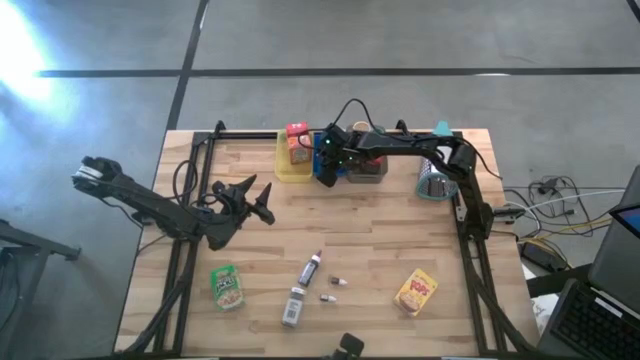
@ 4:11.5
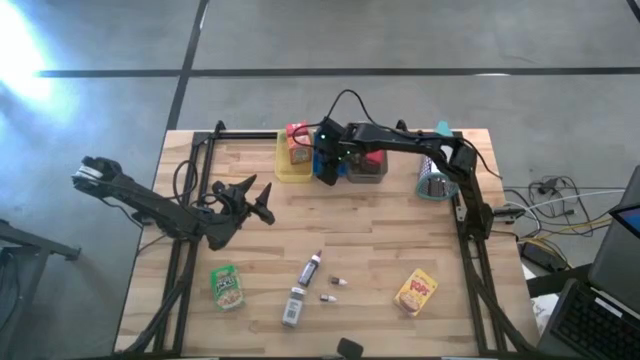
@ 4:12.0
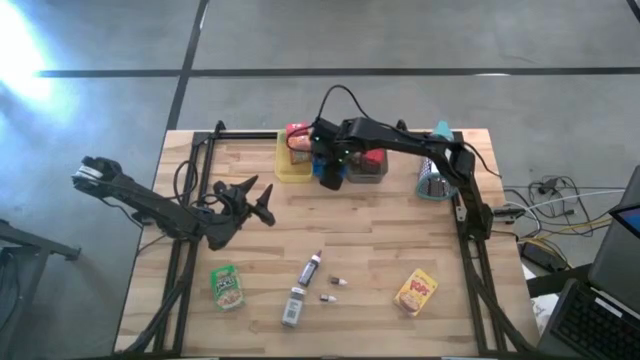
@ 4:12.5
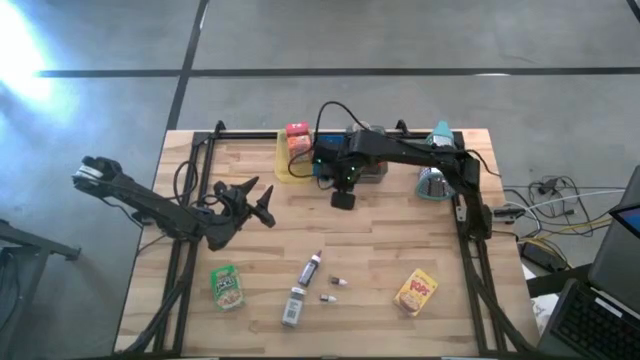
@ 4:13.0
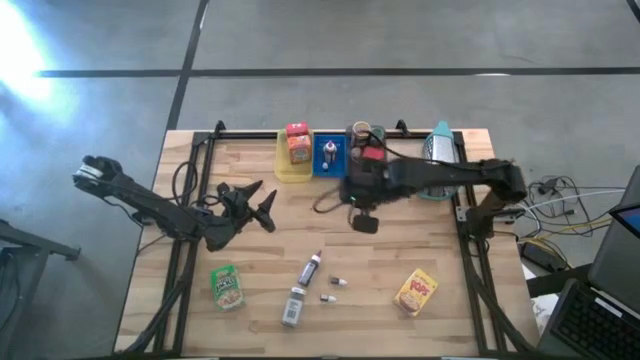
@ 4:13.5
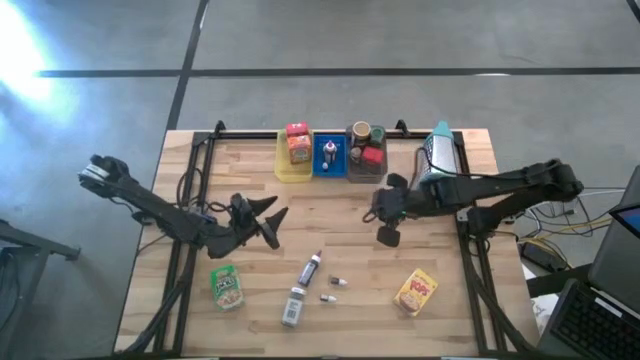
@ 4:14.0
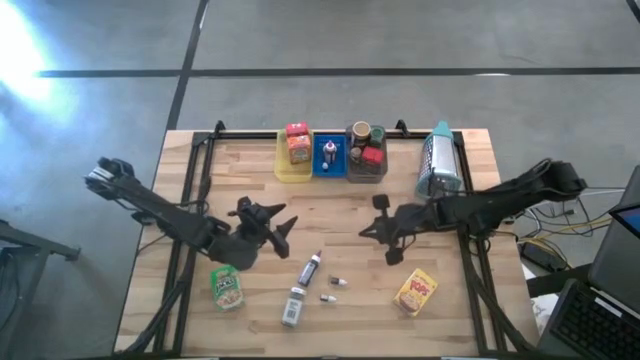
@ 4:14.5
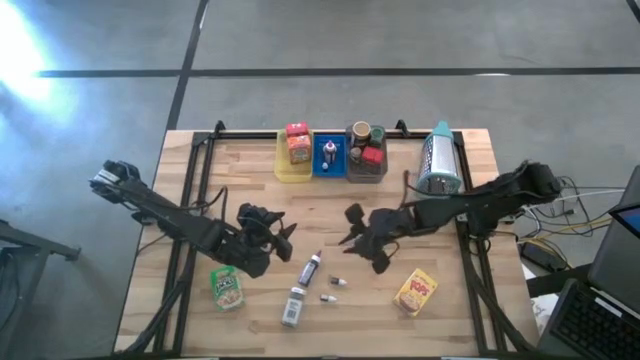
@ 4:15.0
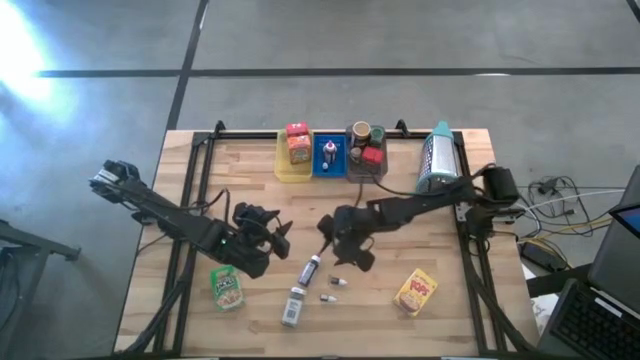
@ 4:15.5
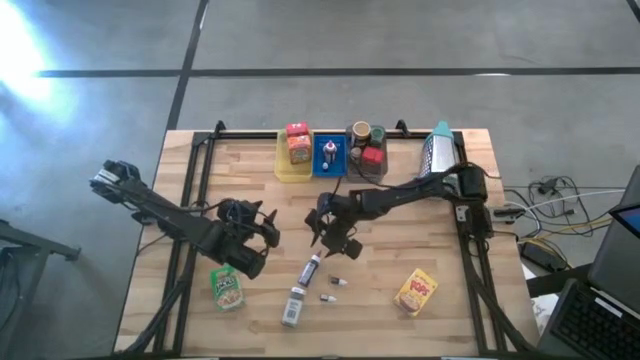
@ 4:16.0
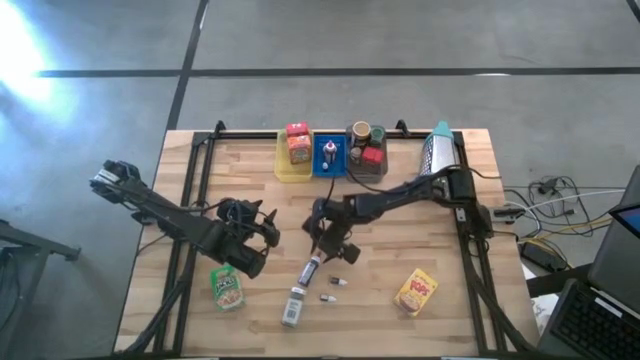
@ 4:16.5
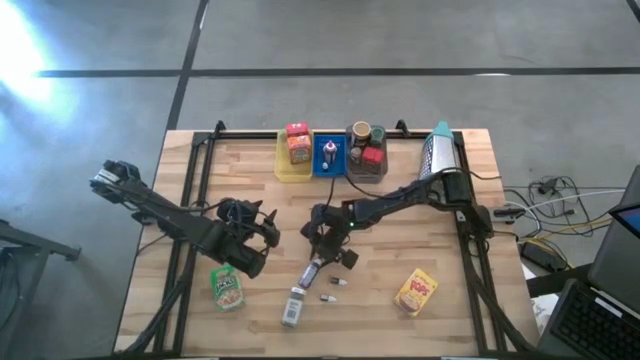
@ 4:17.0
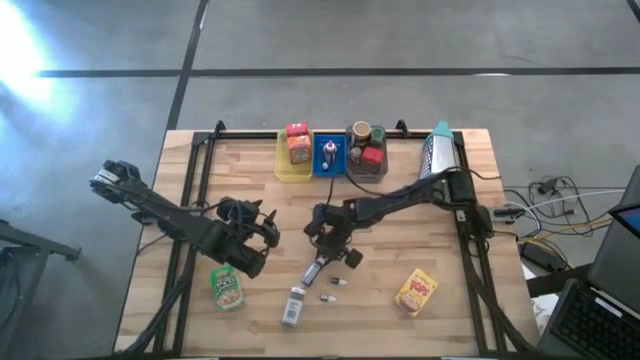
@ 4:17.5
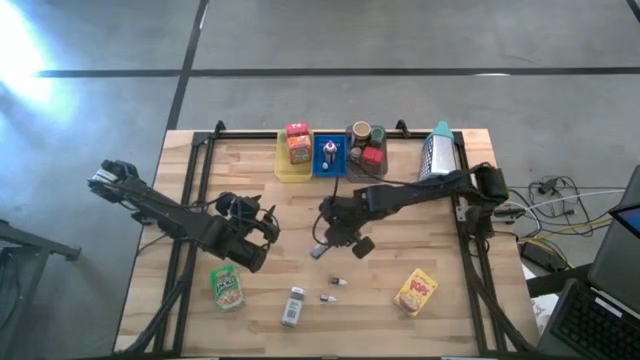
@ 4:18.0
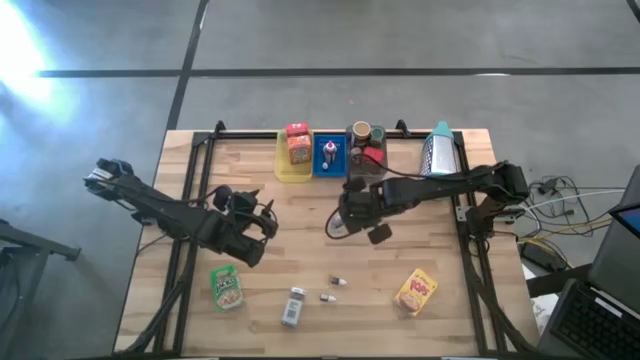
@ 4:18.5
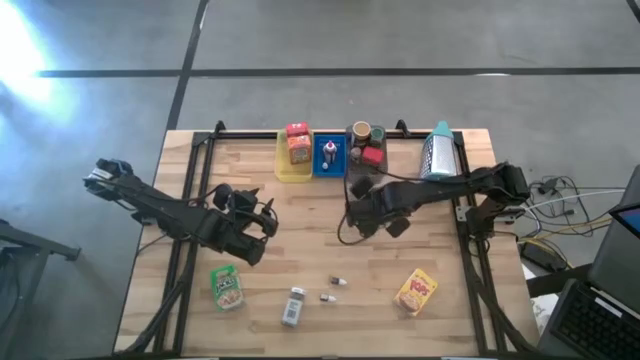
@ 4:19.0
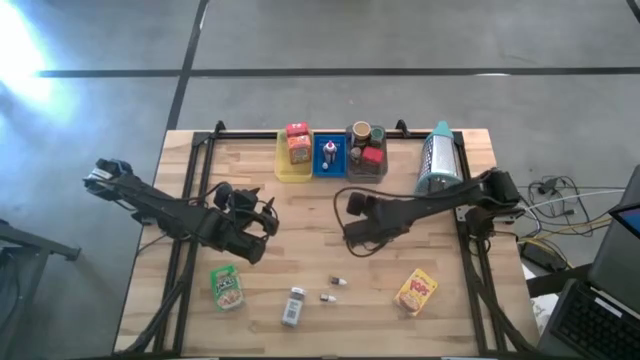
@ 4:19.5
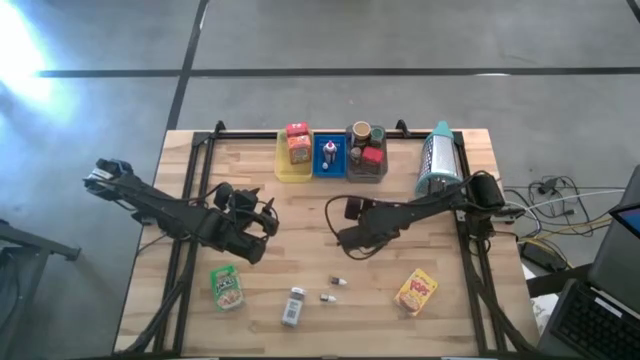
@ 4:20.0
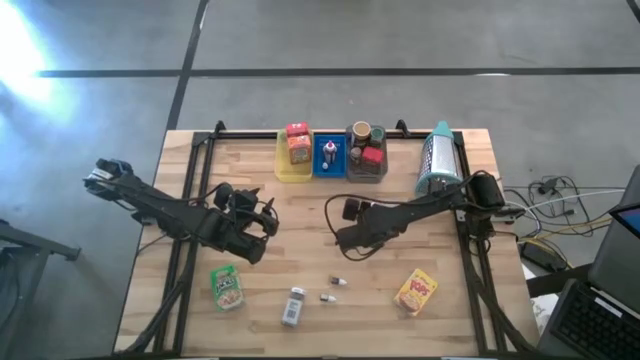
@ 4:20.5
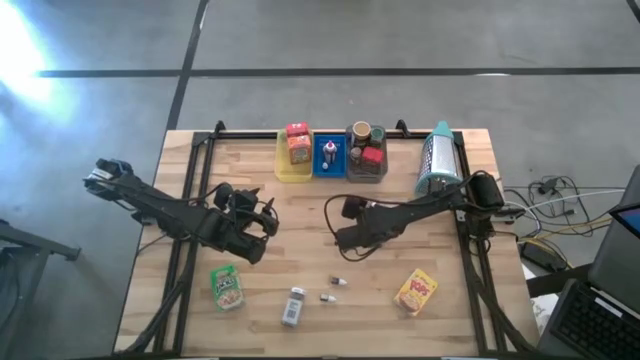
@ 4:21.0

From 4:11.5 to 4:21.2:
Task: Pick & Place Kitchen Items
Move the large purple food coloring bottle to the middle right of the table

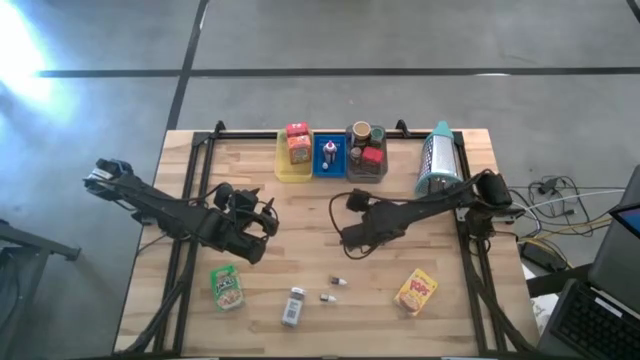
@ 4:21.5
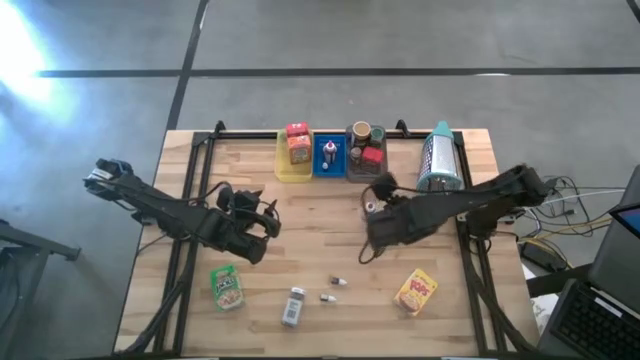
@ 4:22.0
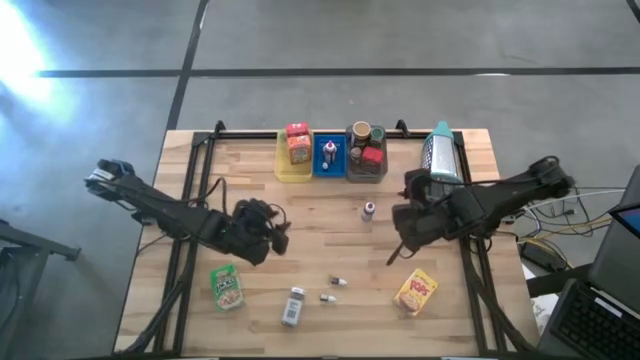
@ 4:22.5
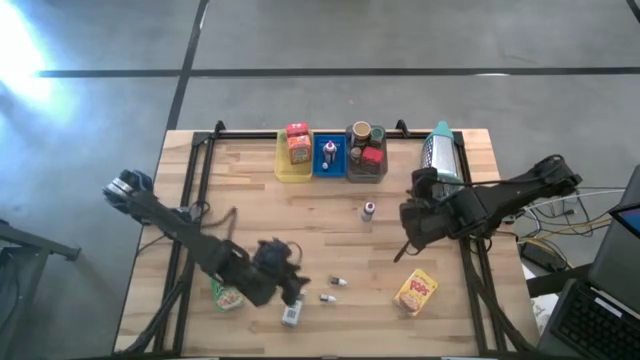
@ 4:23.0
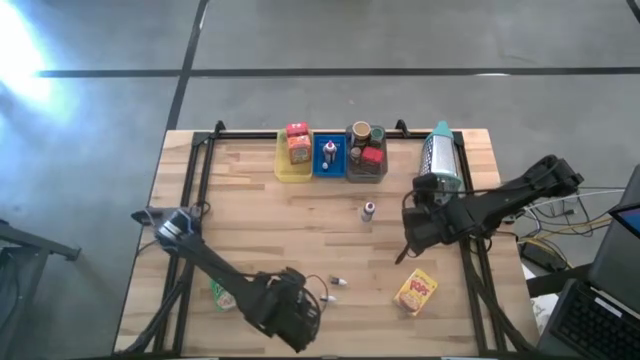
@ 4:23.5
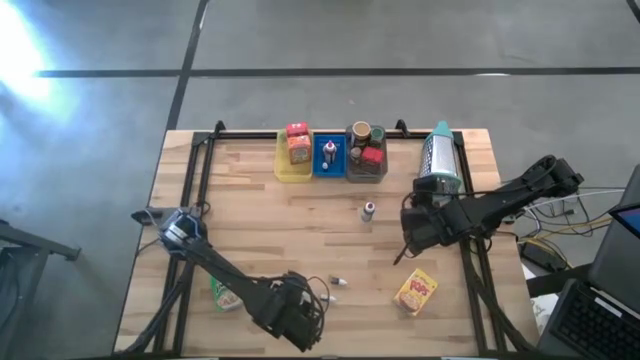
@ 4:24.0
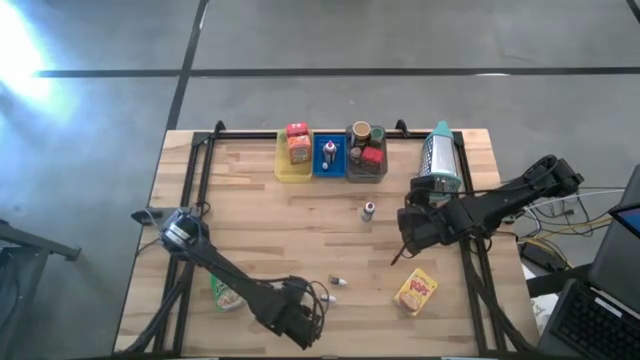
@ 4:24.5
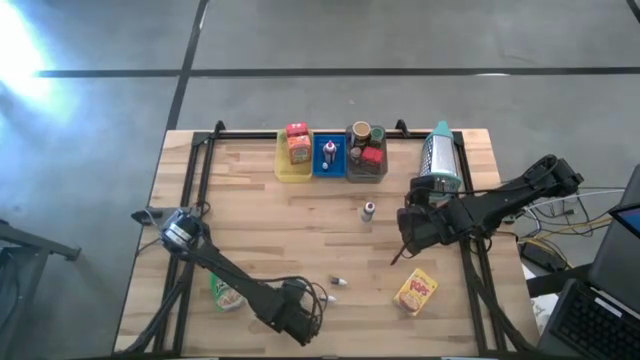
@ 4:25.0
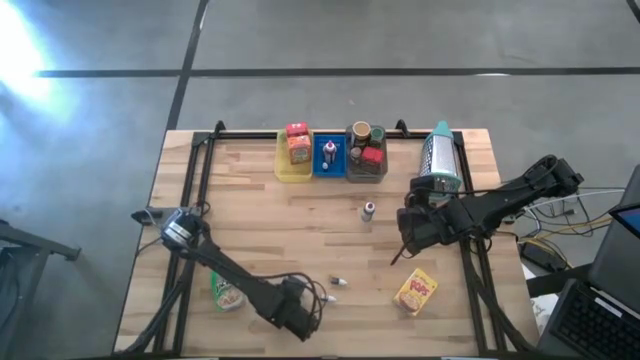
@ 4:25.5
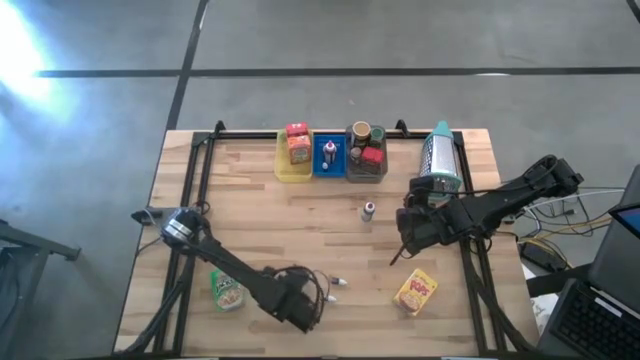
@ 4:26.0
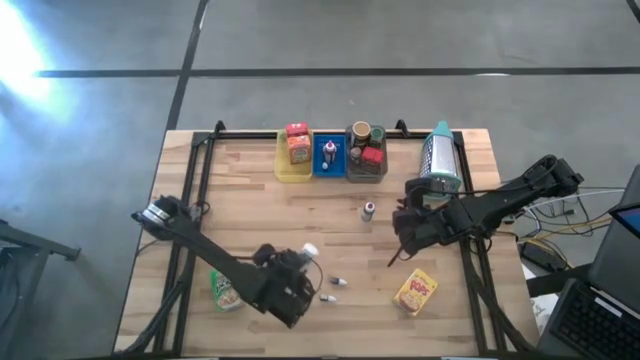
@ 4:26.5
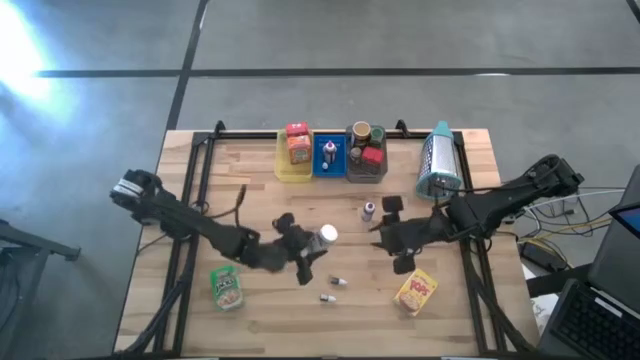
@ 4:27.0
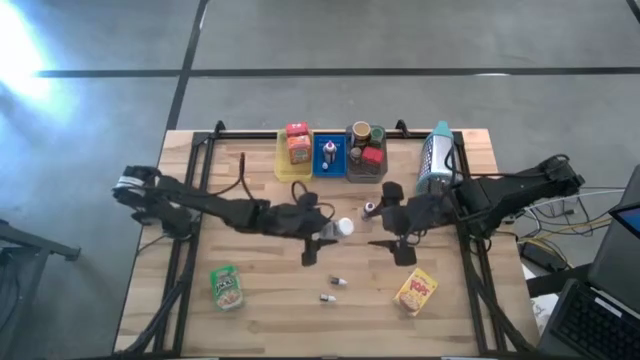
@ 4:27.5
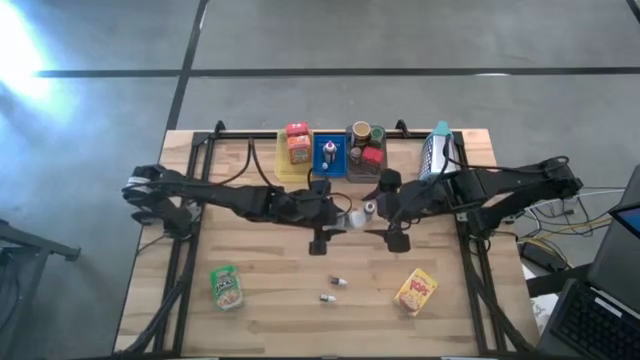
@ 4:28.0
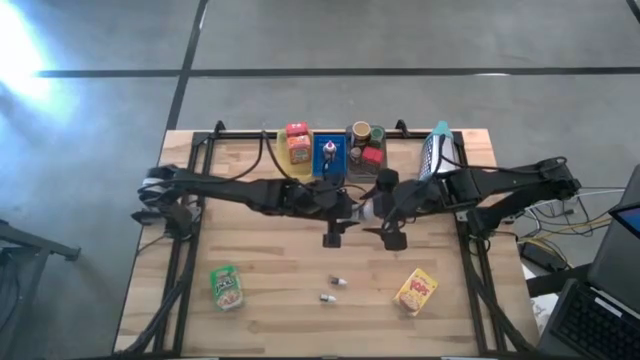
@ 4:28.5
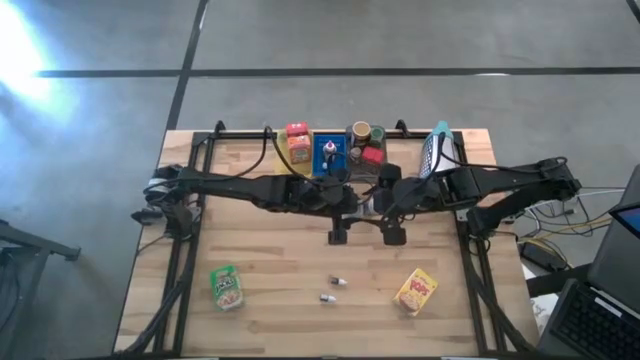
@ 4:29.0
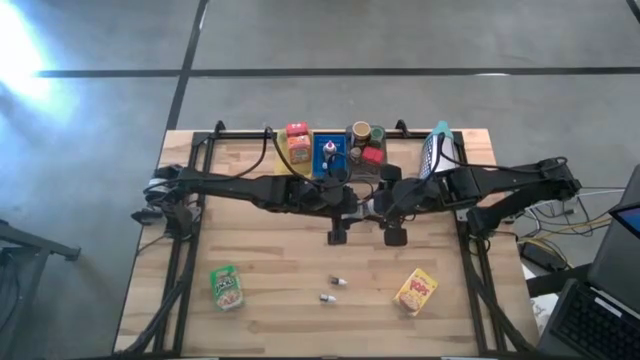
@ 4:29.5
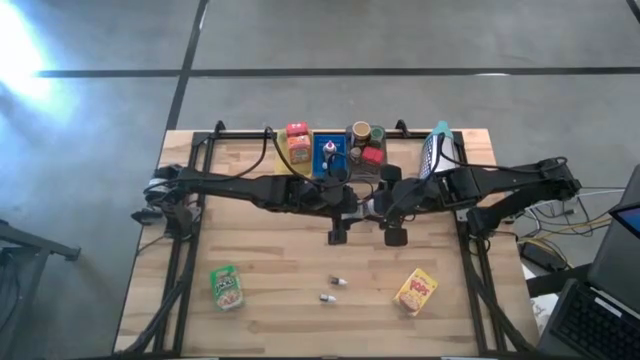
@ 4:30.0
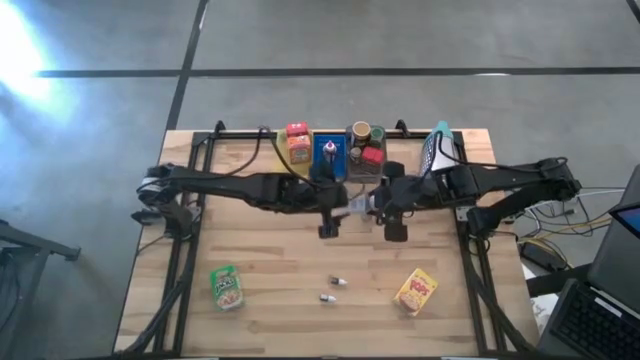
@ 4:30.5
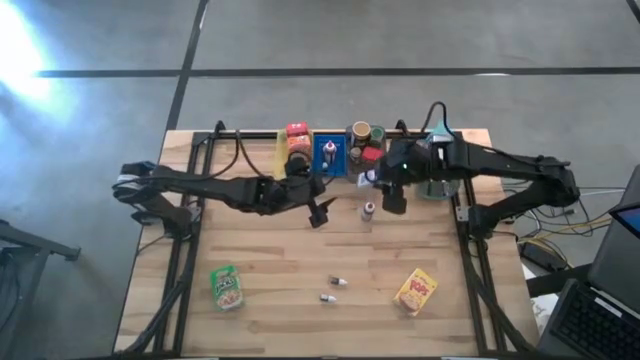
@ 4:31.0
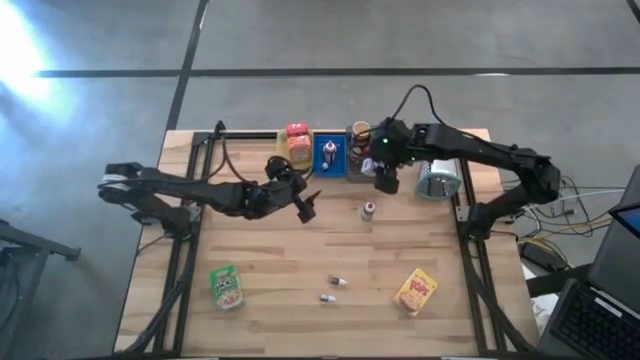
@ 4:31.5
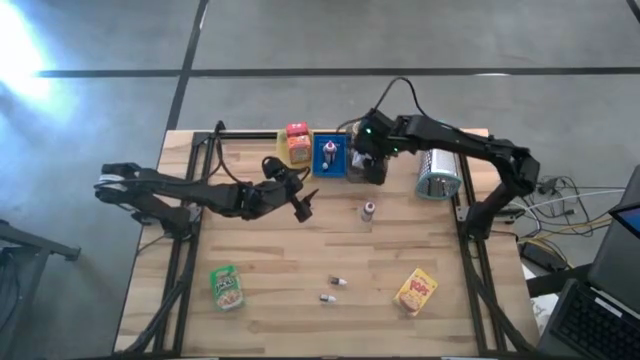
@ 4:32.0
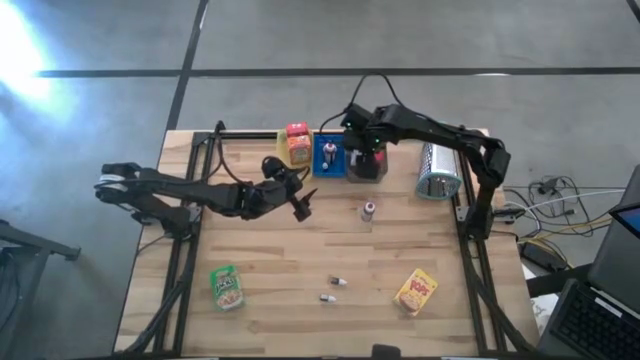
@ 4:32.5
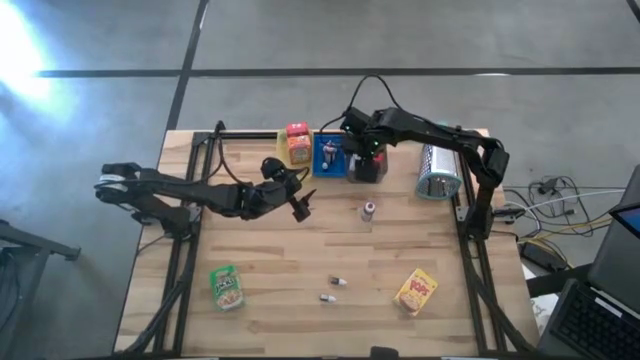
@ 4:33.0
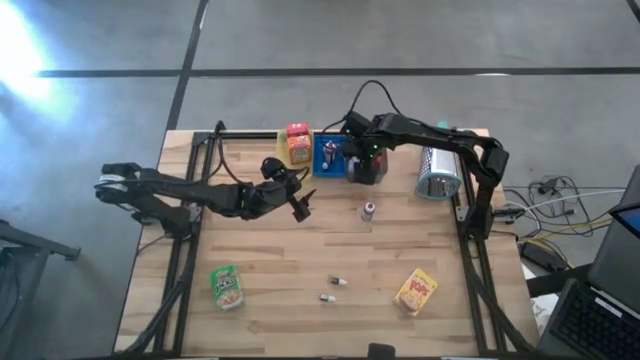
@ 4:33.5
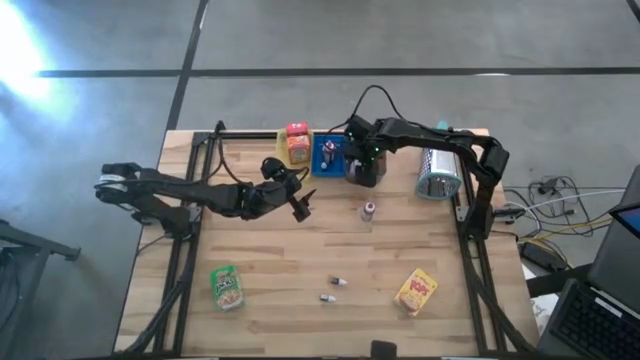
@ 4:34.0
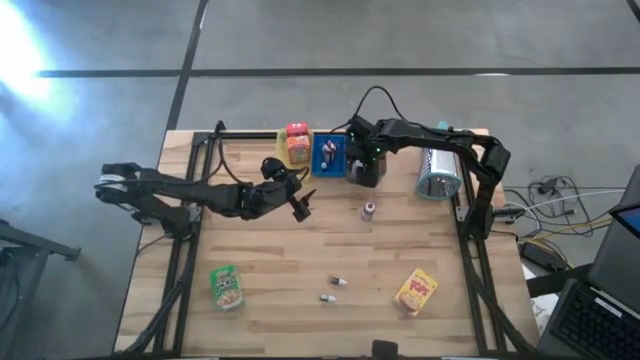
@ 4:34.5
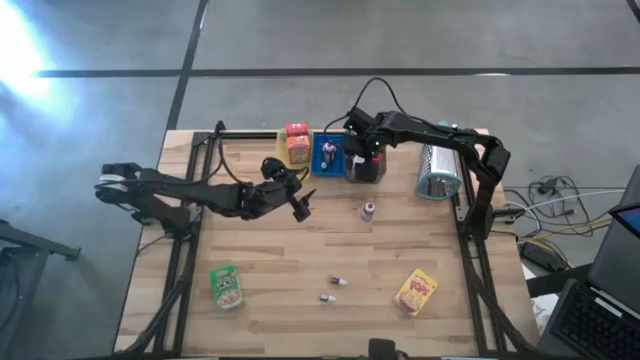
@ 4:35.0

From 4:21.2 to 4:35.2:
Put the white seasoning bottle into the black bin
